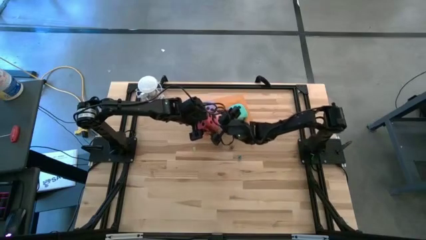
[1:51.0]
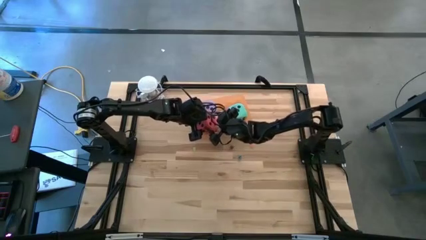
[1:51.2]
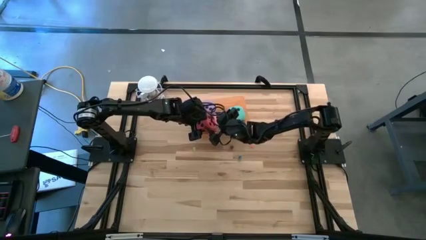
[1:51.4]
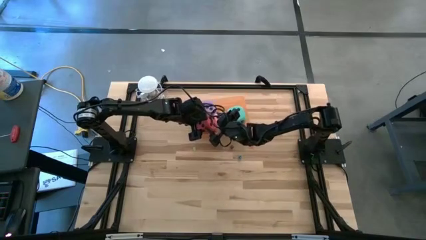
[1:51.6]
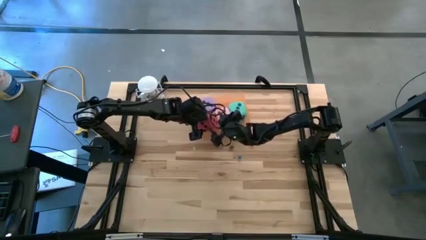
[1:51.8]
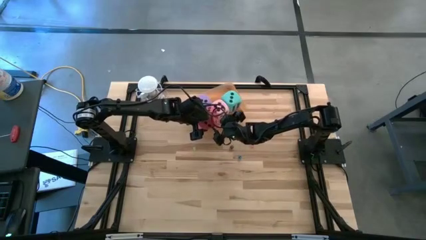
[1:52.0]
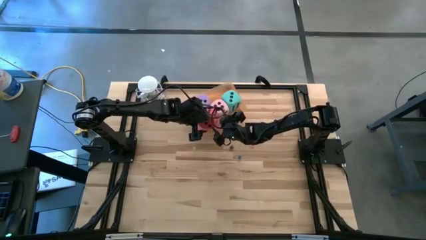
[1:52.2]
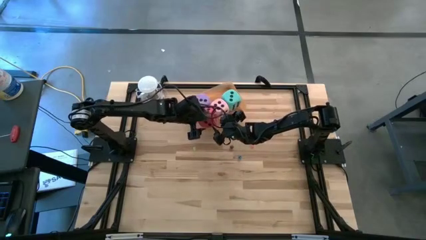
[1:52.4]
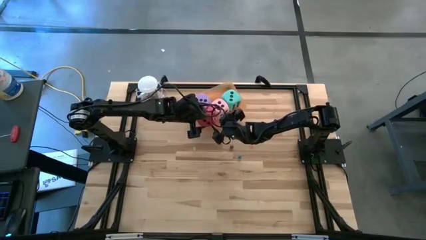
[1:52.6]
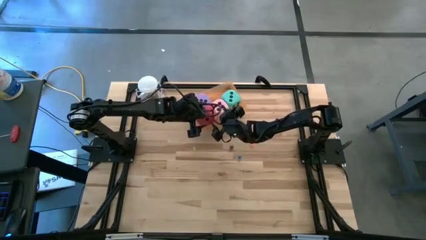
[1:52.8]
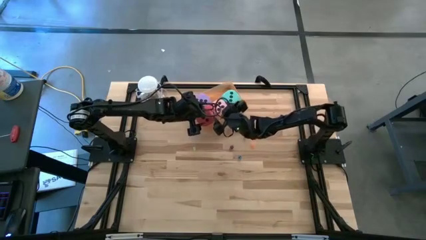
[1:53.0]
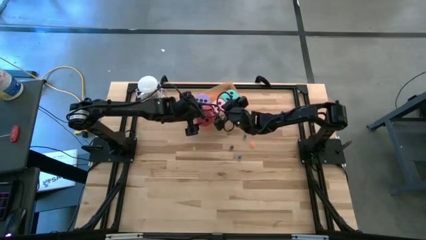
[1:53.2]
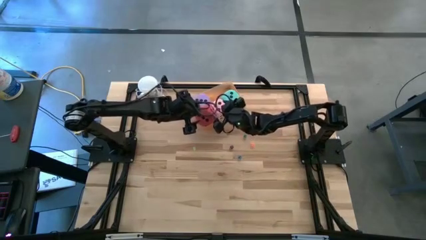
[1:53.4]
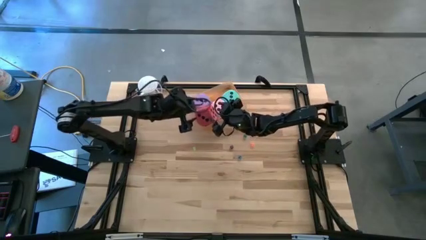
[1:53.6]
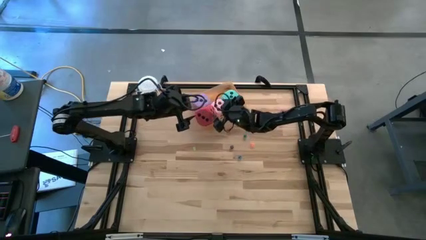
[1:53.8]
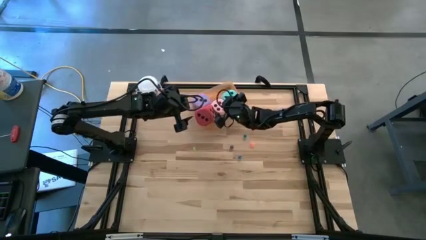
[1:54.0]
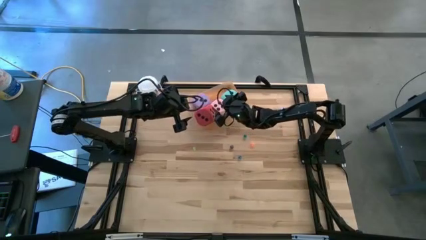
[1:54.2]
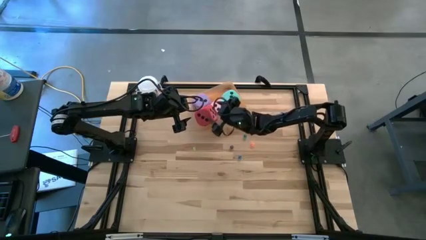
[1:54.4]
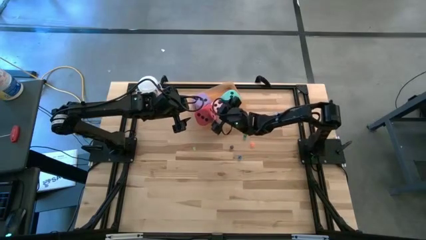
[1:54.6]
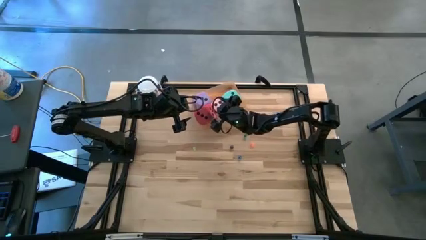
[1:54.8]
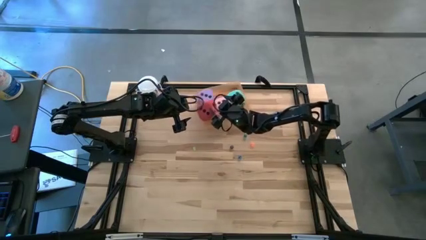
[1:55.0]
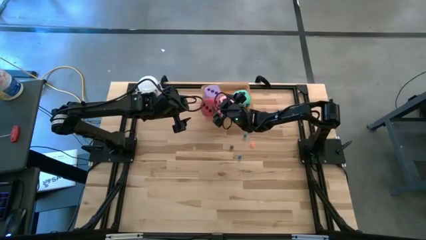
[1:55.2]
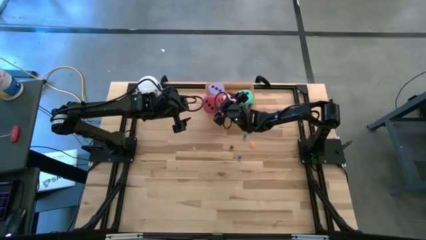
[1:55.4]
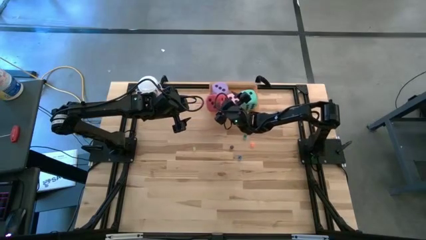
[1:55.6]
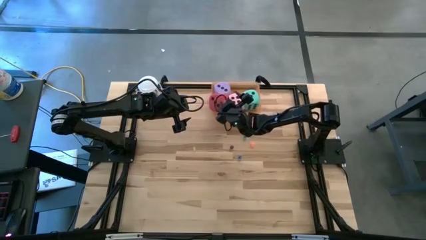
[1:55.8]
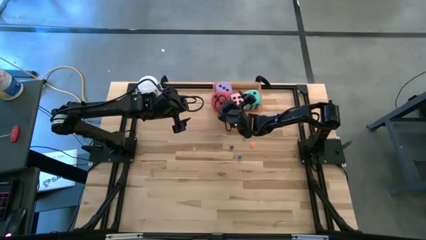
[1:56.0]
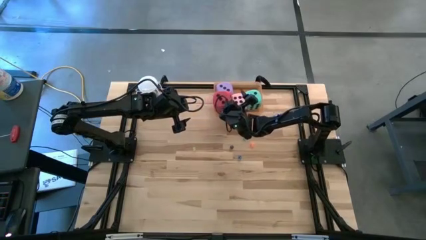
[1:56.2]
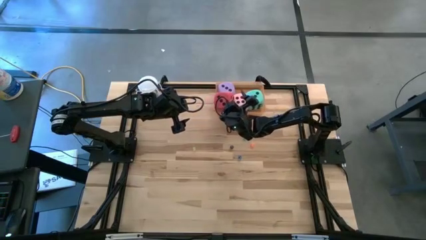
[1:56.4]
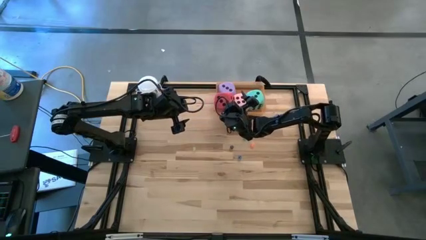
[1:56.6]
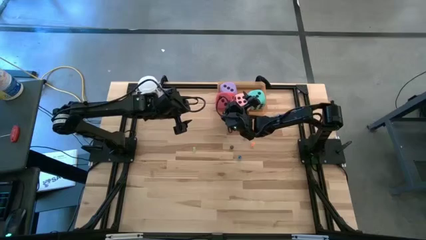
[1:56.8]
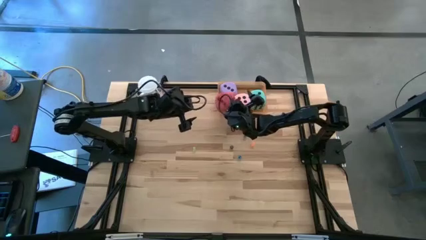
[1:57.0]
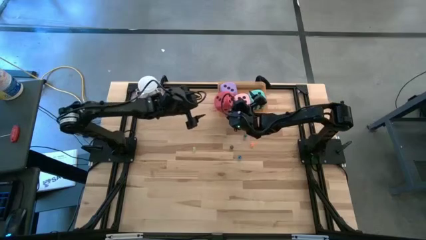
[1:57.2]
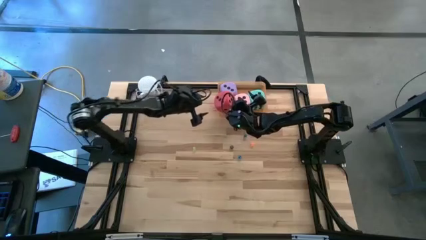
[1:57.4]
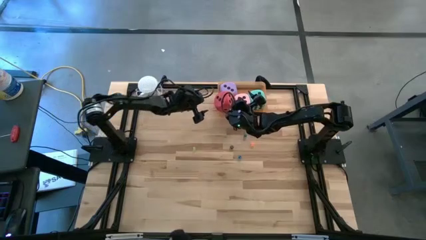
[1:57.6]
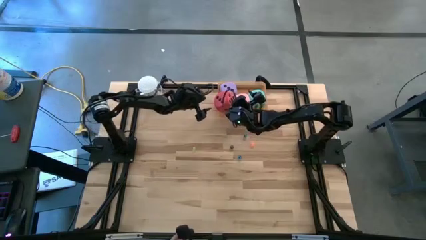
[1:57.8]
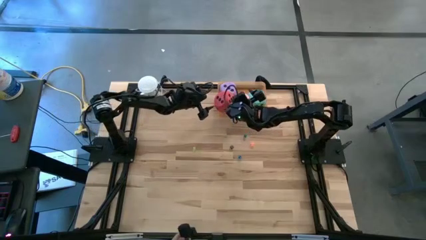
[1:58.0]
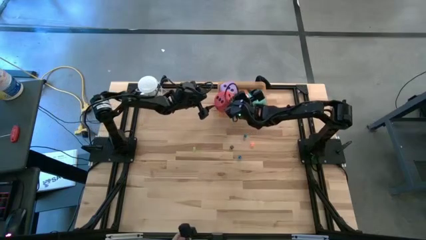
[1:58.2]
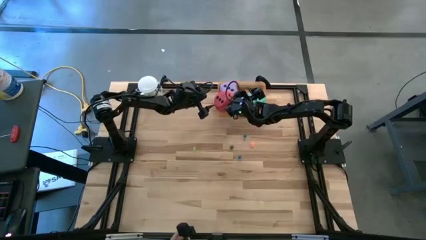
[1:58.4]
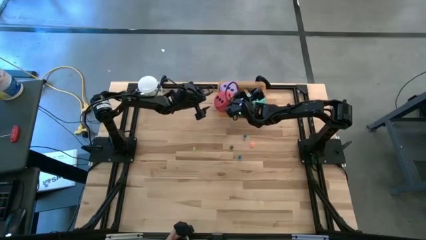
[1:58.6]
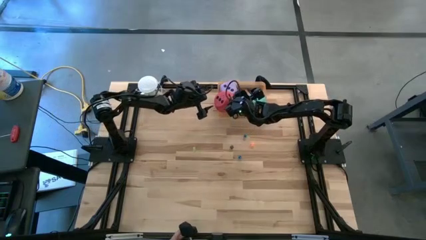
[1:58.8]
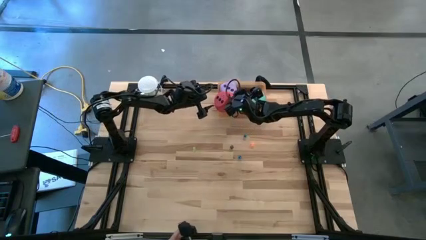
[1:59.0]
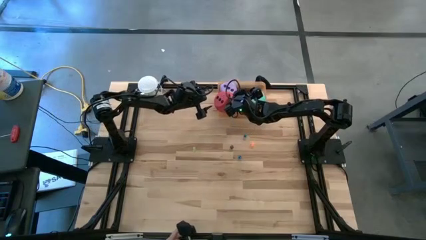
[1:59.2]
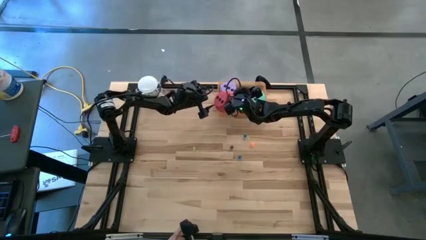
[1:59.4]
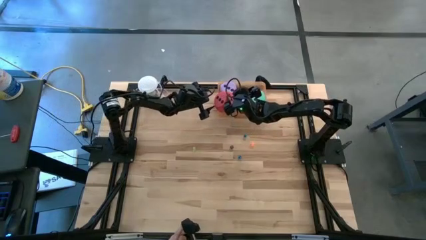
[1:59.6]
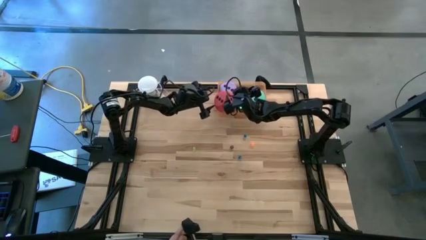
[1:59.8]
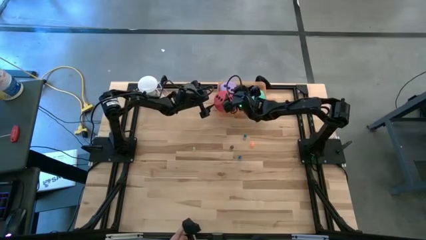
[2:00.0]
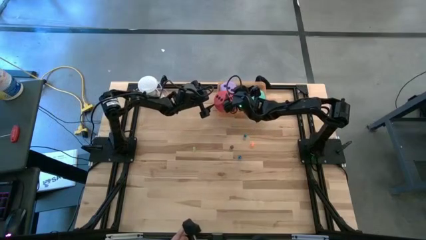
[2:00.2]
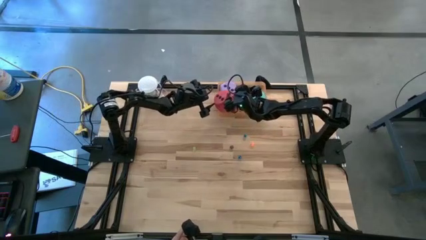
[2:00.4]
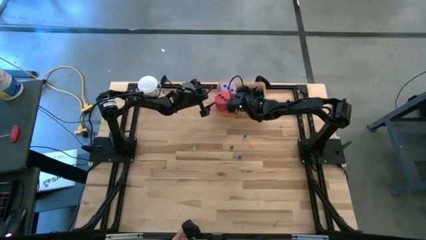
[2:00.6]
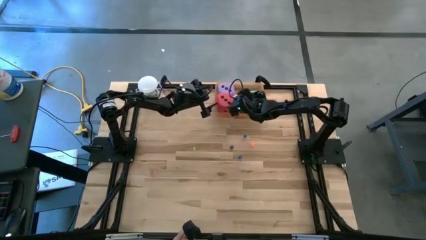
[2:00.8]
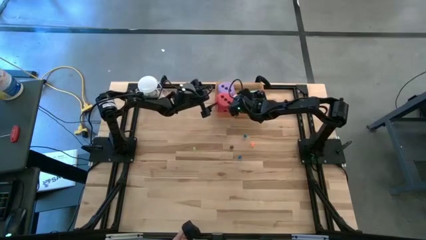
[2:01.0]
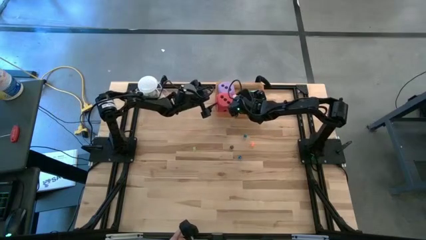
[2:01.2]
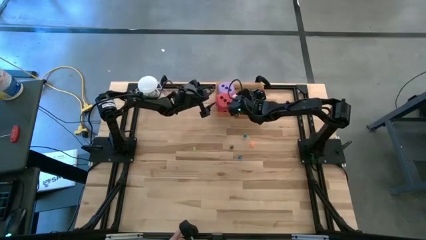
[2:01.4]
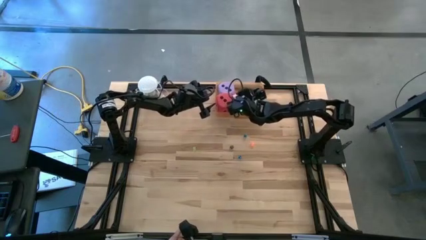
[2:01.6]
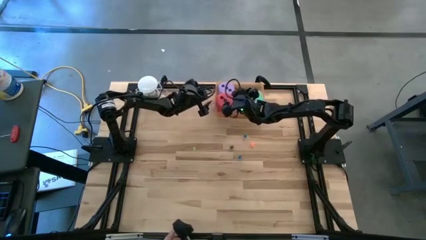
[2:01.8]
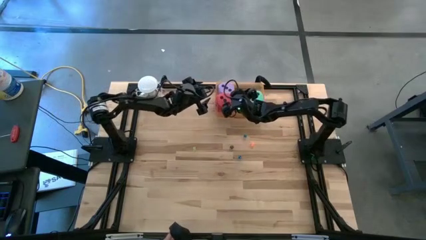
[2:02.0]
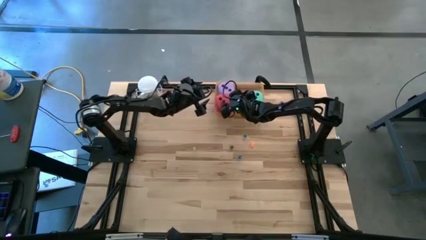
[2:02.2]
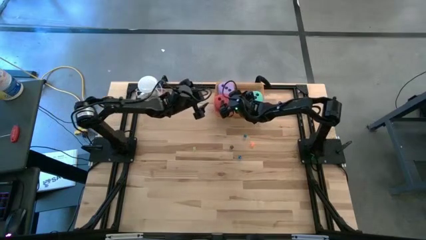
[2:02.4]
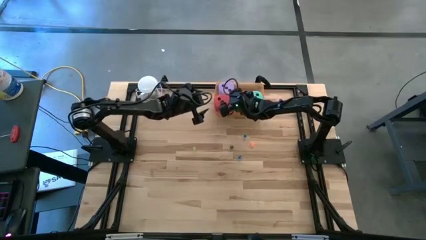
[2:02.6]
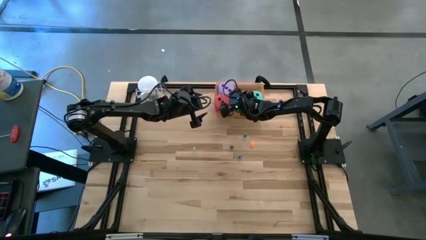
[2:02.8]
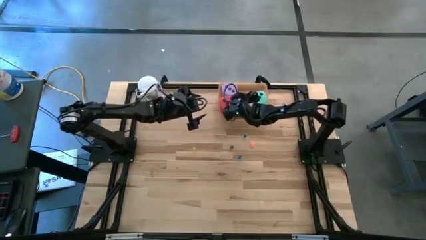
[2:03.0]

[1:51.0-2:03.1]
Task: Pick & Place Dice
Put the big red die into the orange bin
